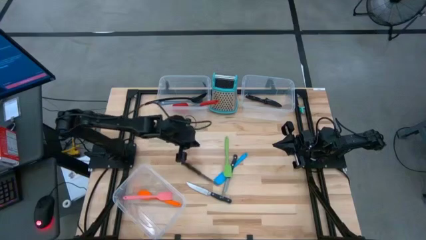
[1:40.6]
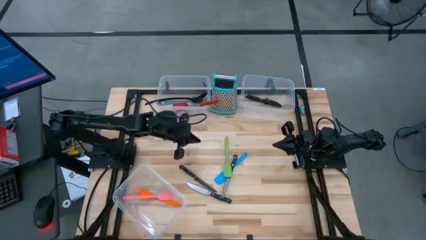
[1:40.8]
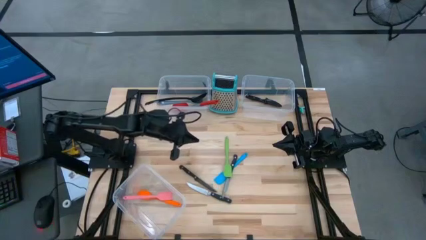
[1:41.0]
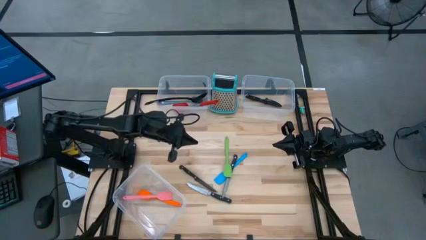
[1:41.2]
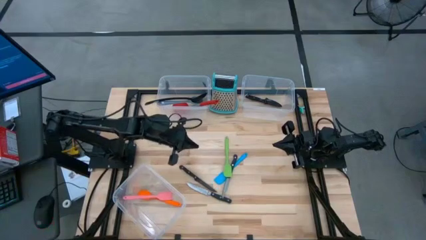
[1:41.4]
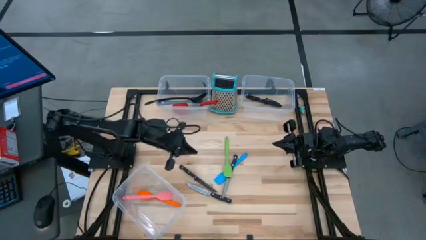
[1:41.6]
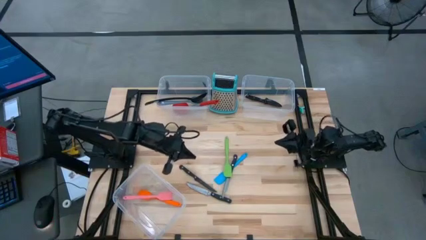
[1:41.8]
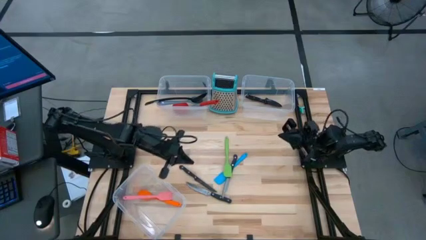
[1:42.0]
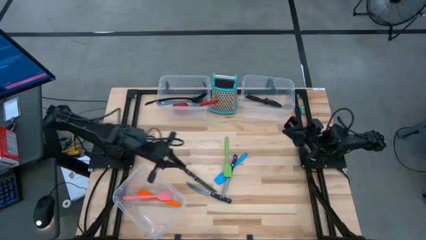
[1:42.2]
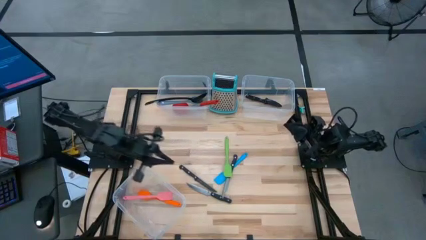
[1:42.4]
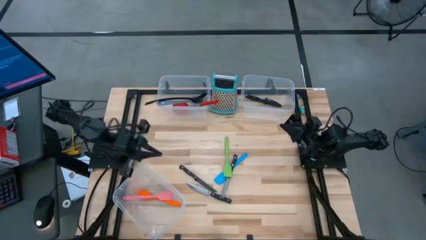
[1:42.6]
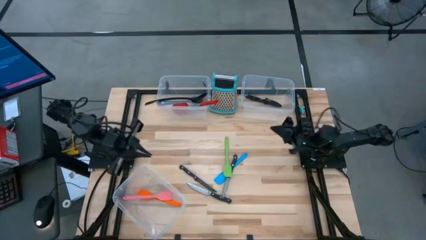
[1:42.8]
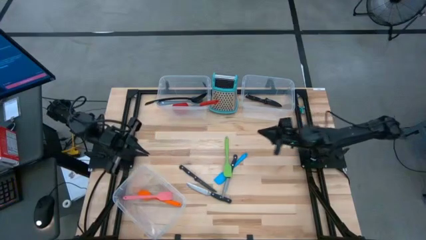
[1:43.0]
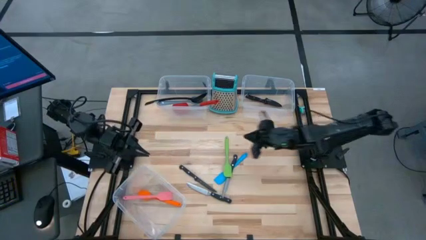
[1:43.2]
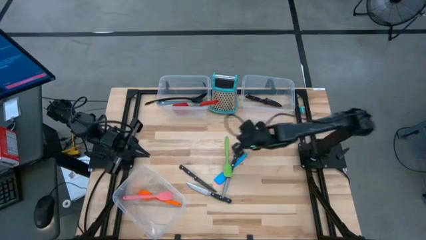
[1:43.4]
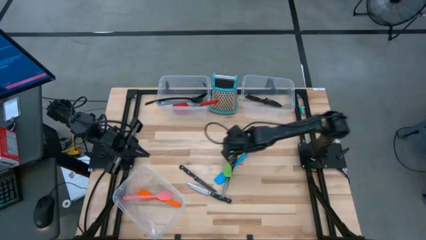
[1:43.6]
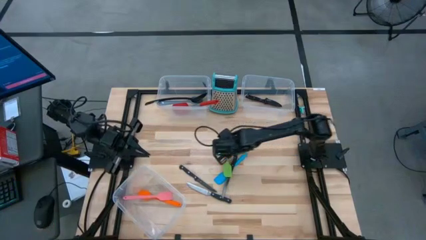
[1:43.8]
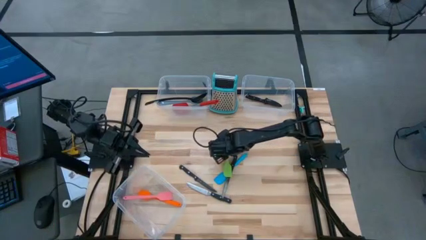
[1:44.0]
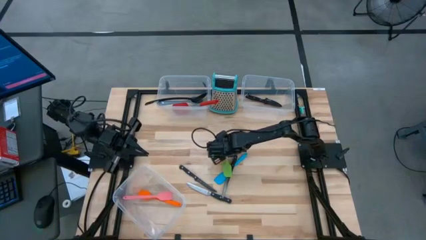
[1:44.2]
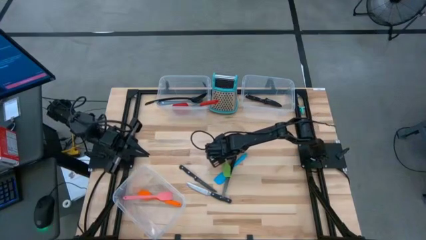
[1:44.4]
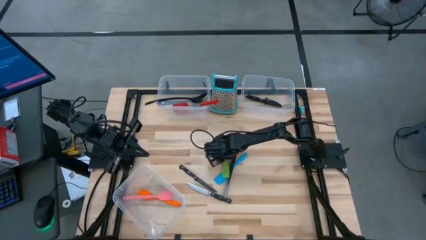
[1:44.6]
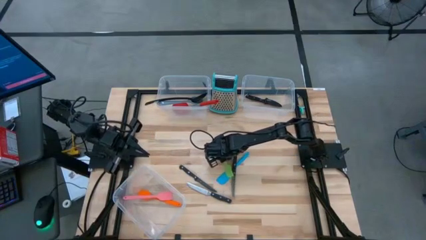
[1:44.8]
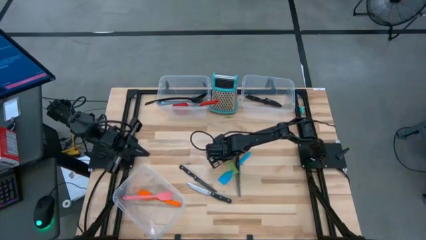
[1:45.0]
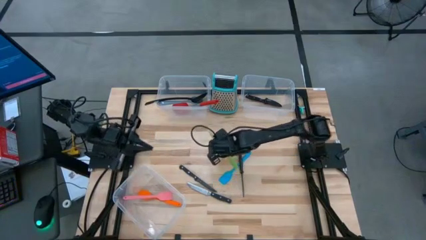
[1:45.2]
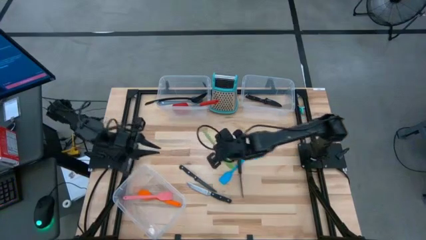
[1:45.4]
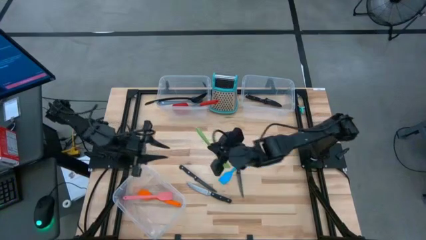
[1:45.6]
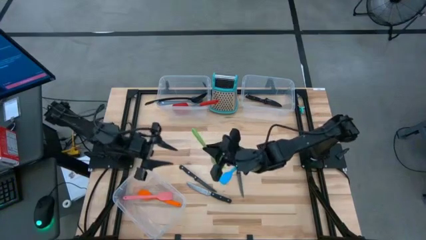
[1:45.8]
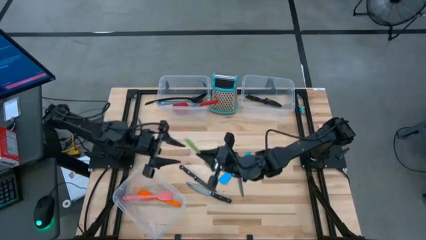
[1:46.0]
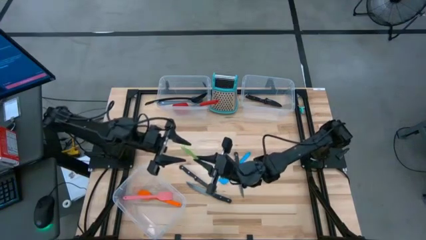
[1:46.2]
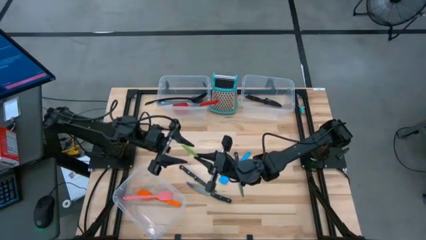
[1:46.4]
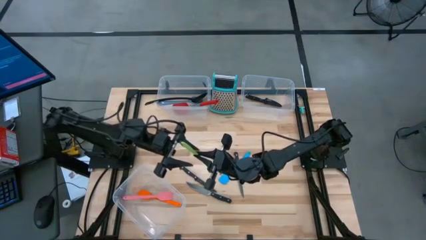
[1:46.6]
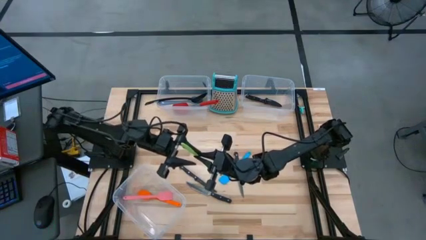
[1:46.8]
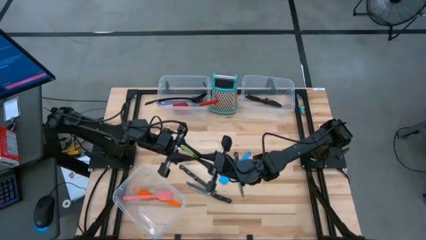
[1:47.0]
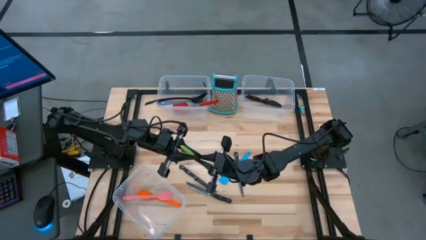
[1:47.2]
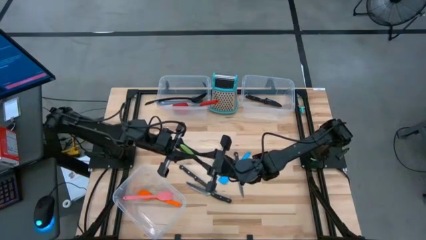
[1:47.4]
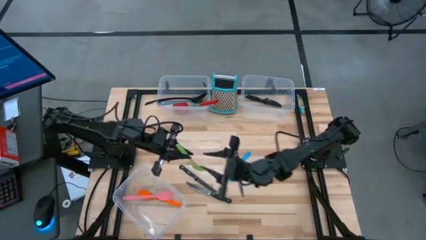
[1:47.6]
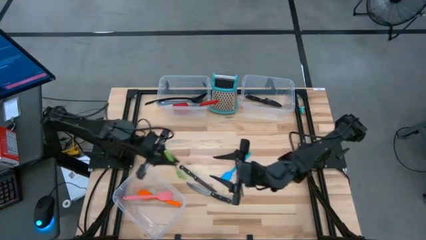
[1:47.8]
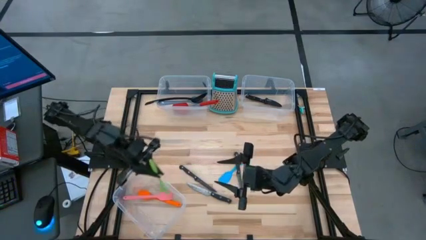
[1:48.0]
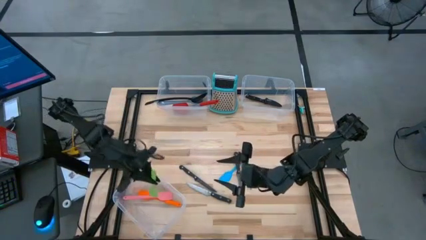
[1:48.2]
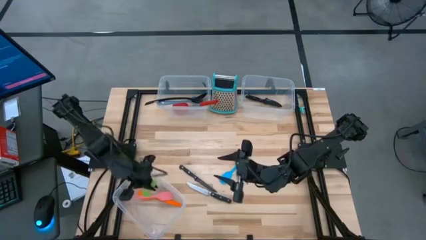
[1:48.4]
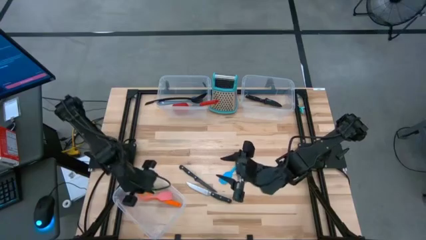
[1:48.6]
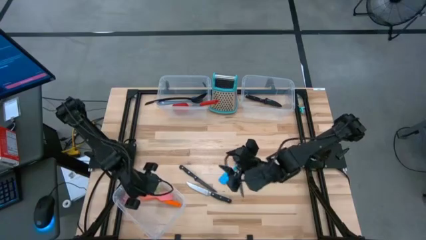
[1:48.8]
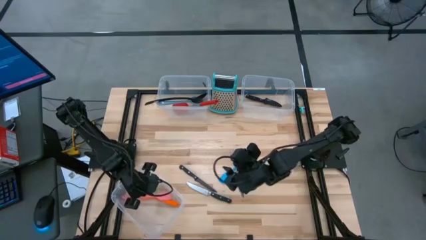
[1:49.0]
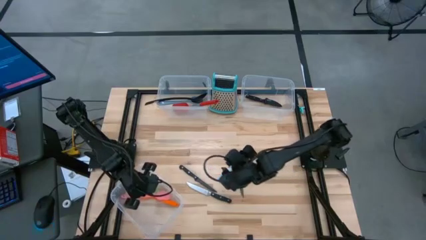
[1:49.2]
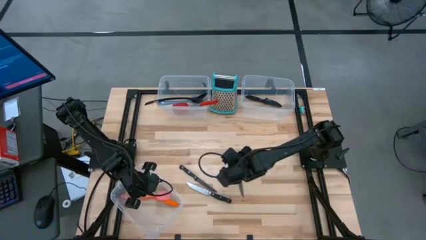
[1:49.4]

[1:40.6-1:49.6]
Task: Pick & Place Kitchen Items
Put the green spatula into the bottom transparent bin

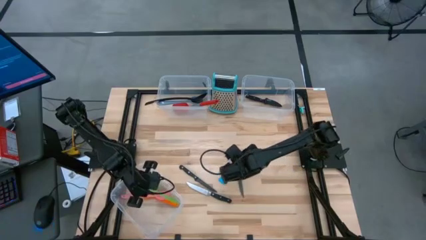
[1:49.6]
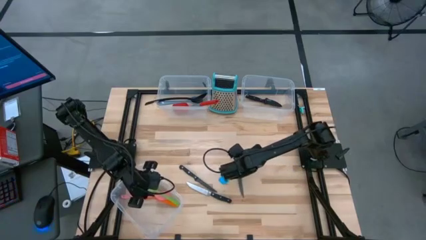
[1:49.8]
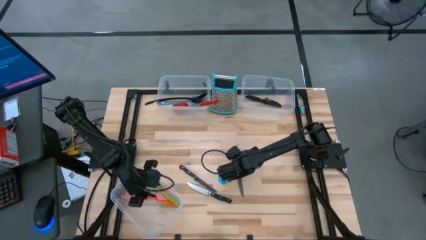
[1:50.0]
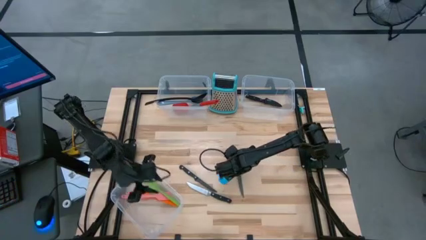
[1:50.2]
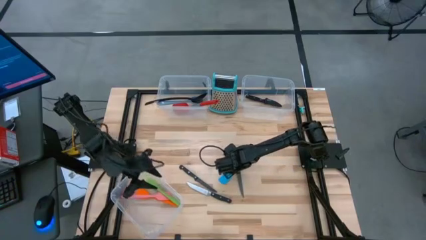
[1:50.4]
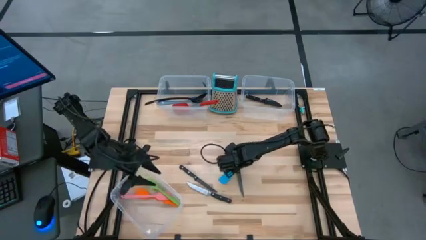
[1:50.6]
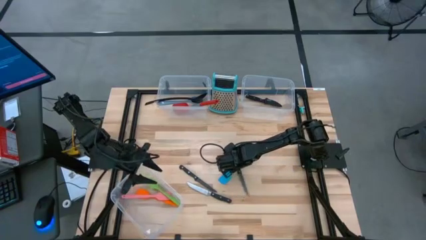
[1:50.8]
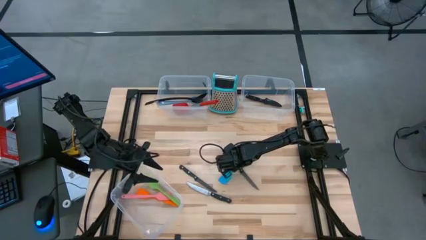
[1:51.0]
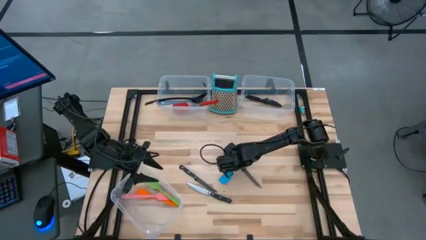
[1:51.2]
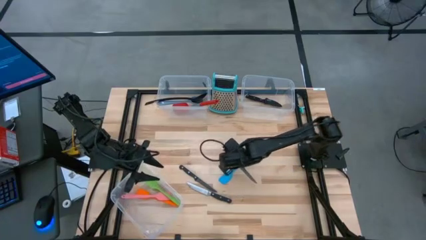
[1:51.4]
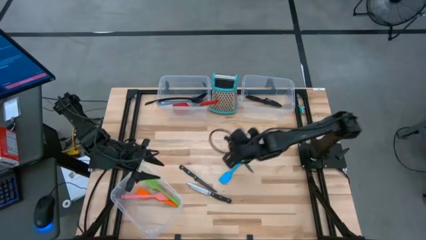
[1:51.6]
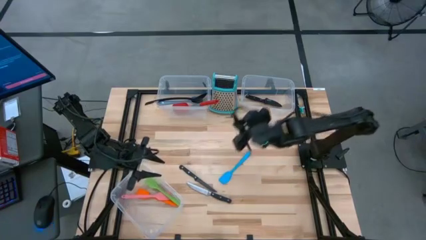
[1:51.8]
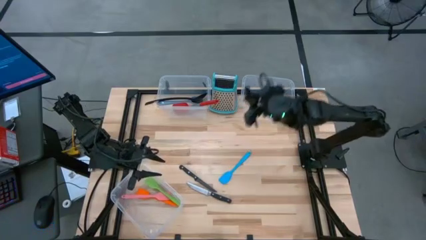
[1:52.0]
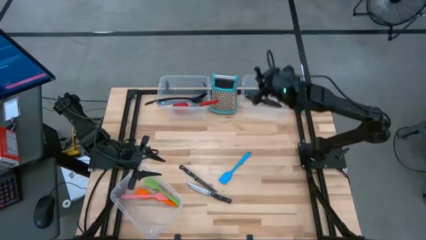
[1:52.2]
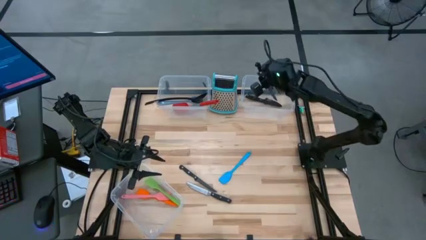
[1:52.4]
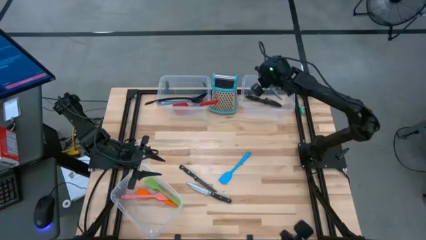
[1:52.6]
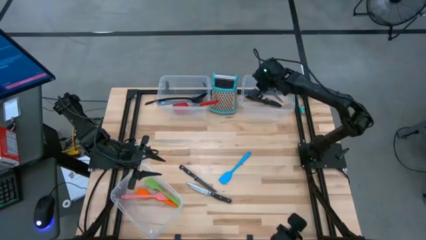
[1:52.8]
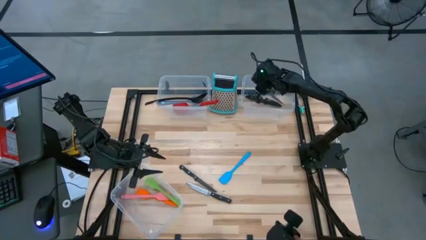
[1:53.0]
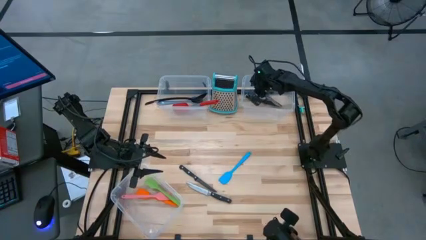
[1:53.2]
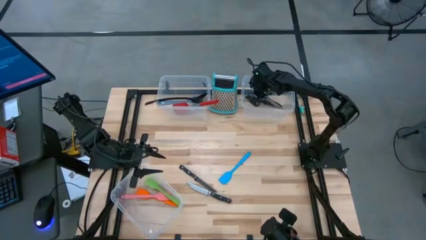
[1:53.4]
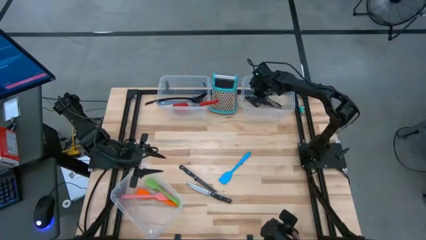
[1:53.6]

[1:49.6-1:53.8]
Put the silver and black table knife into the top right transparent bin

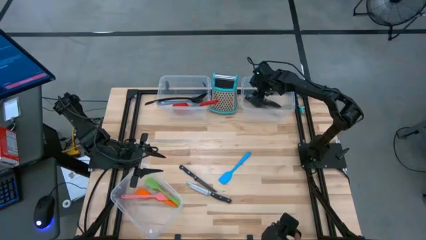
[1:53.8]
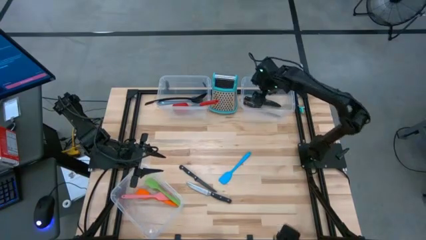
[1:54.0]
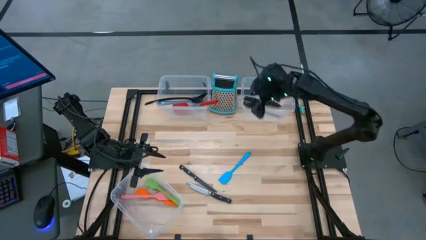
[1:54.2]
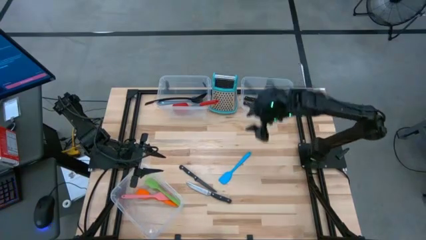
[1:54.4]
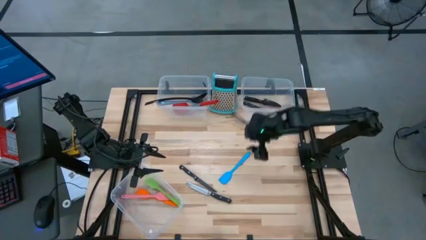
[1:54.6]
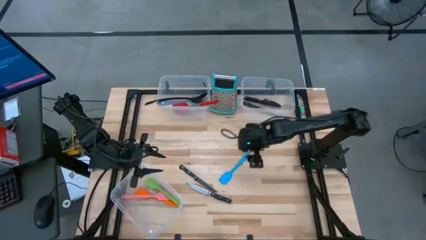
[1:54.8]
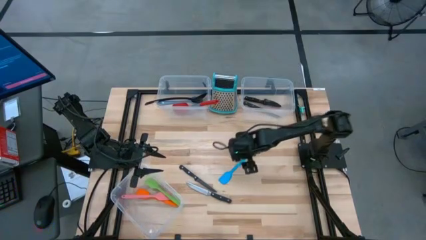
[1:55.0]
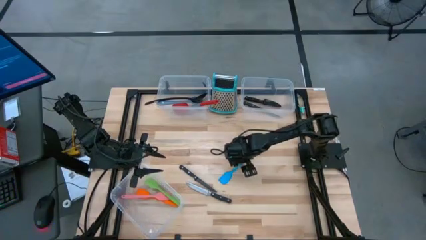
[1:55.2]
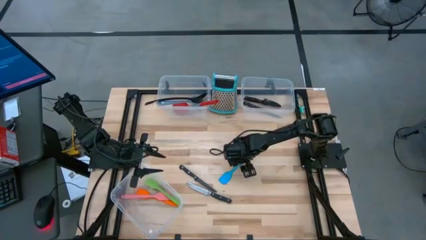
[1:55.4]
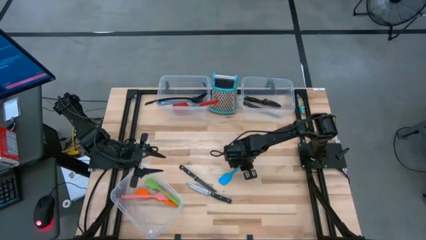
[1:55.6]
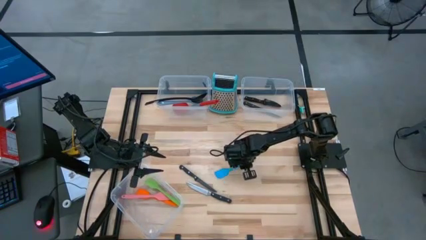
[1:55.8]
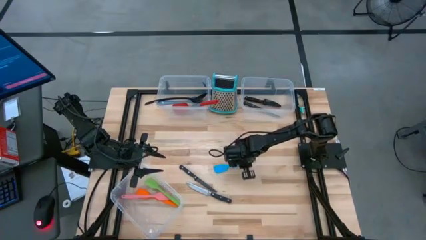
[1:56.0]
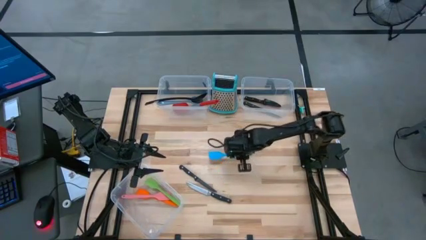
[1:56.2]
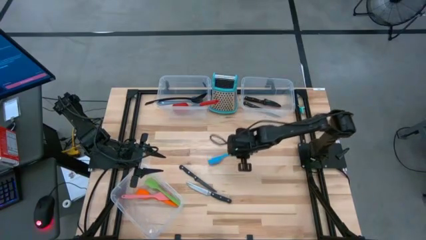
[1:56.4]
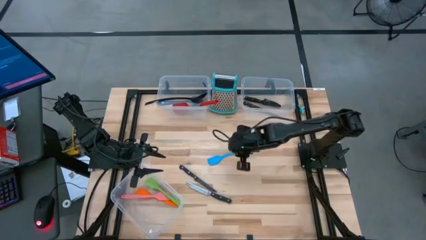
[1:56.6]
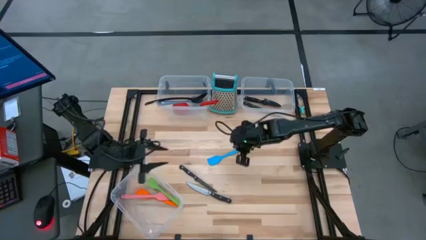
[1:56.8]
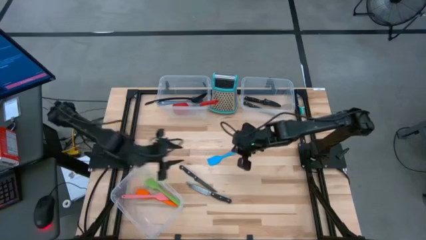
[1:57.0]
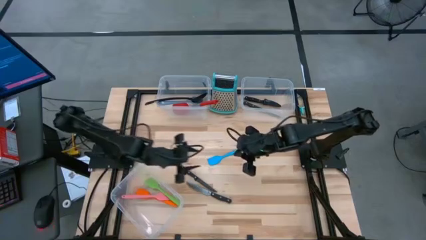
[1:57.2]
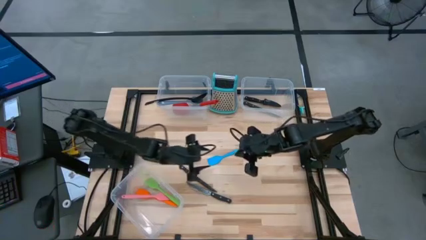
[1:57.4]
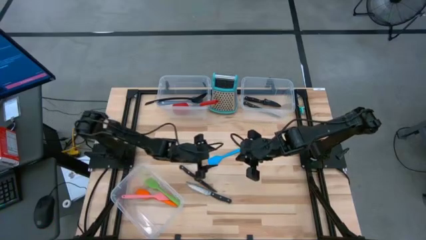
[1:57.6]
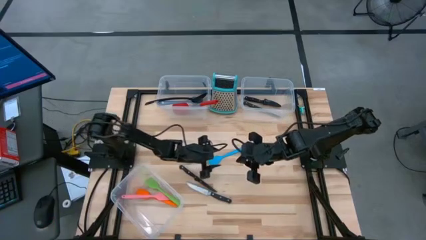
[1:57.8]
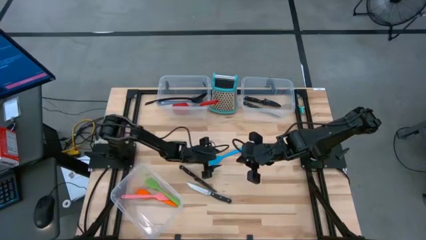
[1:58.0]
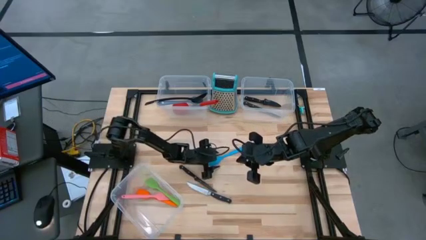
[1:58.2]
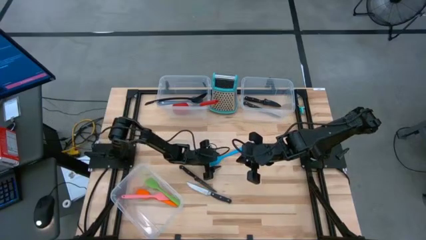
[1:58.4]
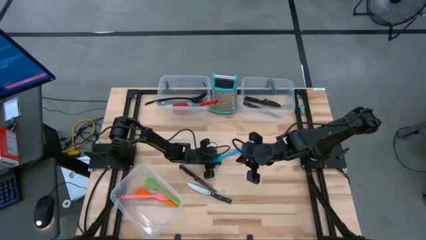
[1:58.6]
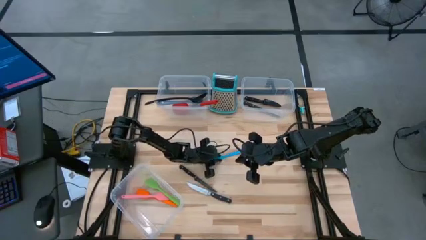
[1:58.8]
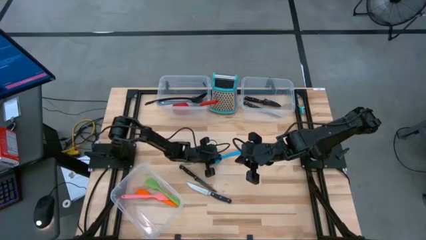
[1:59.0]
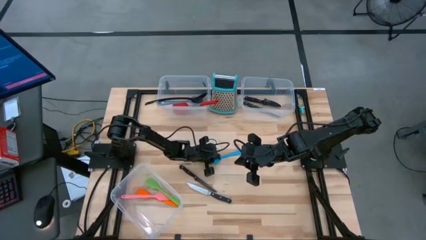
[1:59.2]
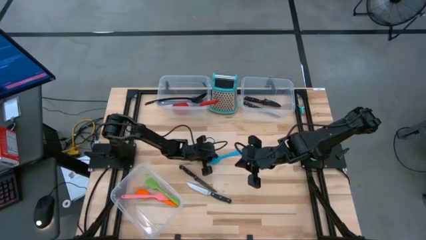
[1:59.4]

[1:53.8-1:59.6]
Put the blue spatula into the bottom transparent bin
